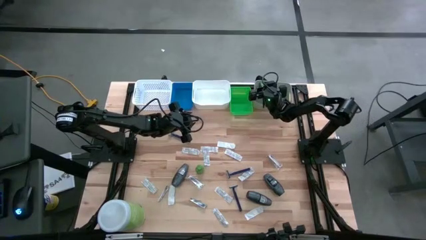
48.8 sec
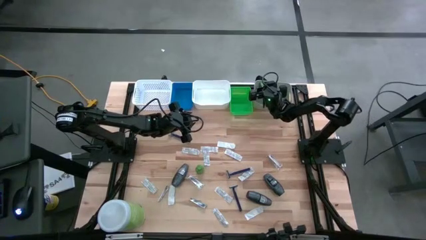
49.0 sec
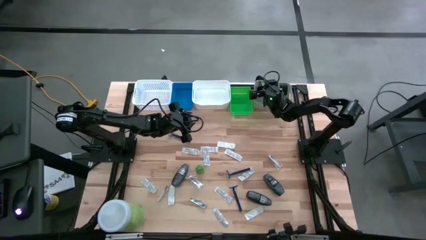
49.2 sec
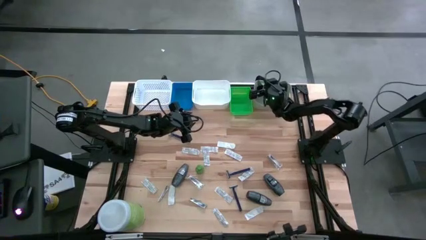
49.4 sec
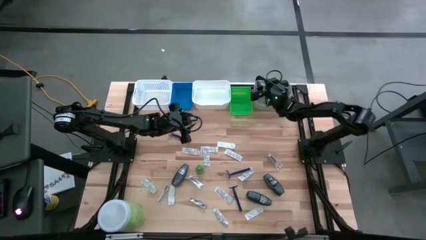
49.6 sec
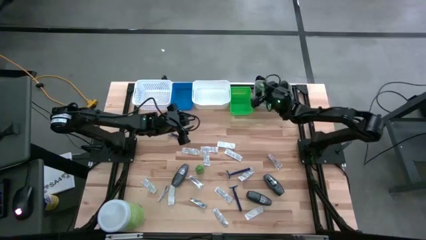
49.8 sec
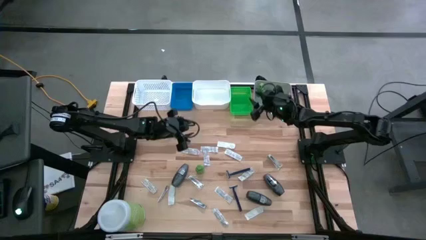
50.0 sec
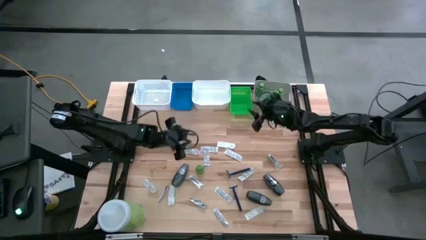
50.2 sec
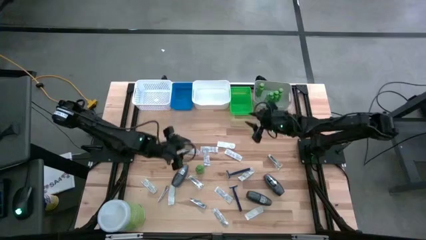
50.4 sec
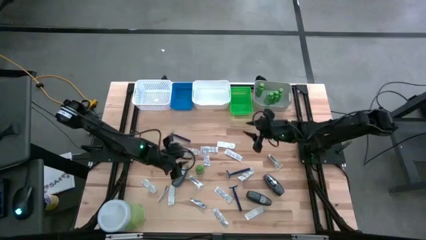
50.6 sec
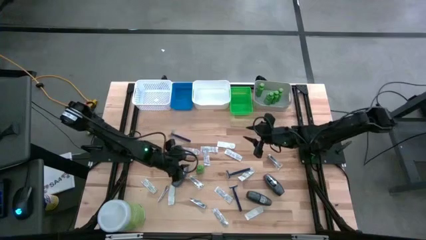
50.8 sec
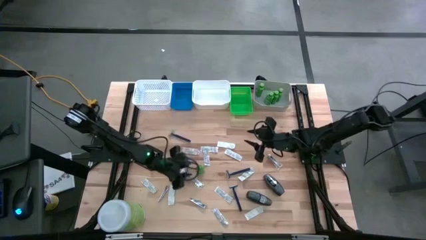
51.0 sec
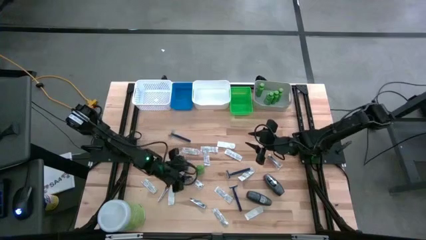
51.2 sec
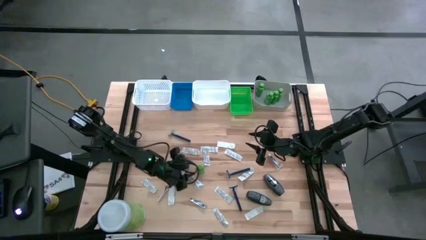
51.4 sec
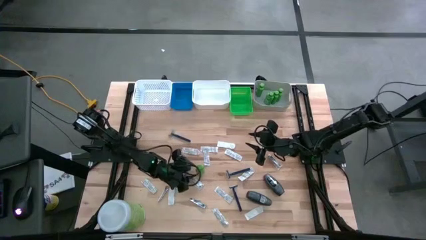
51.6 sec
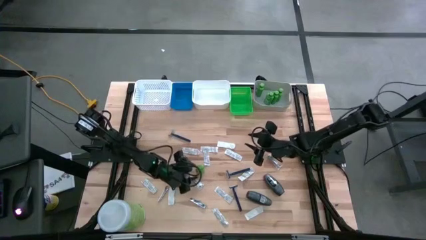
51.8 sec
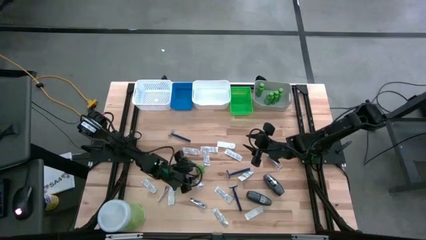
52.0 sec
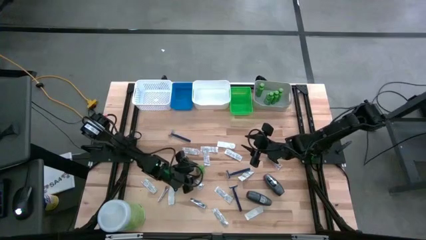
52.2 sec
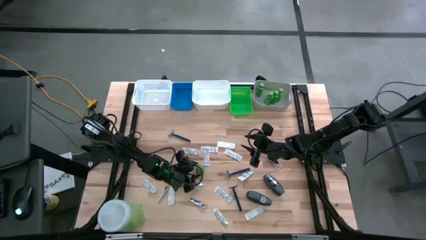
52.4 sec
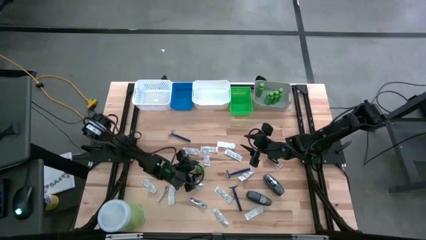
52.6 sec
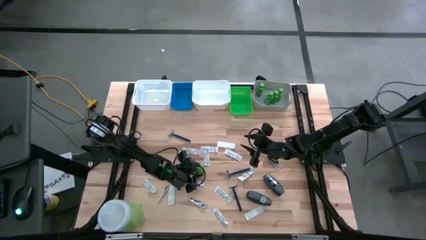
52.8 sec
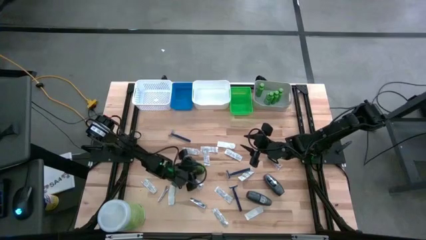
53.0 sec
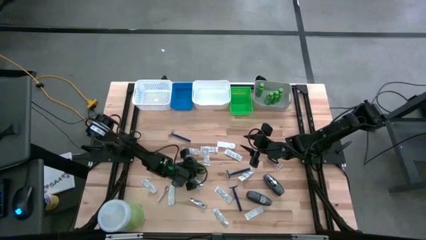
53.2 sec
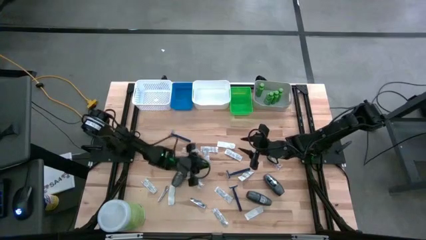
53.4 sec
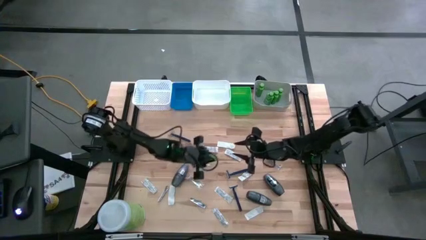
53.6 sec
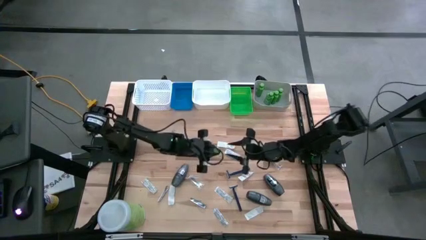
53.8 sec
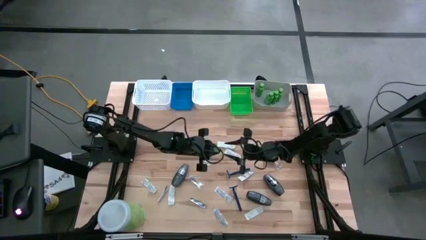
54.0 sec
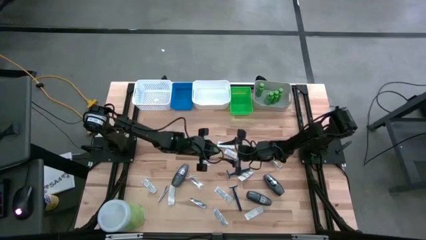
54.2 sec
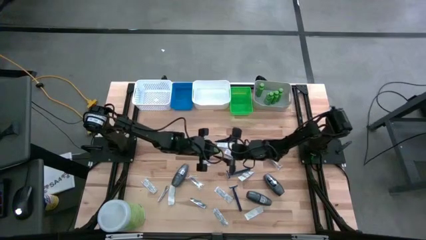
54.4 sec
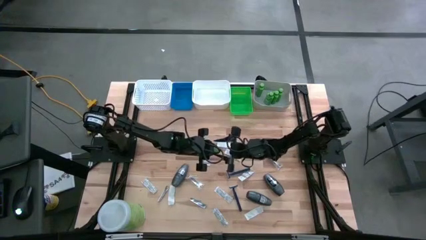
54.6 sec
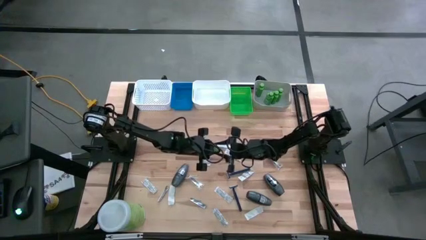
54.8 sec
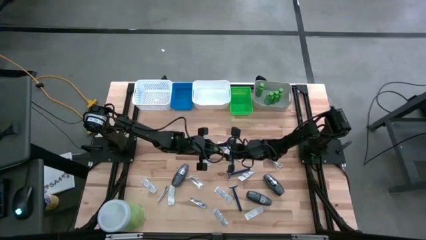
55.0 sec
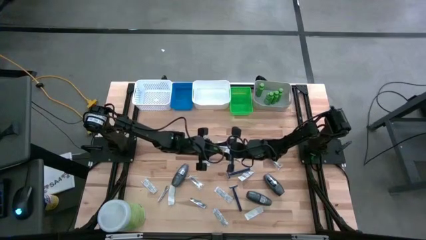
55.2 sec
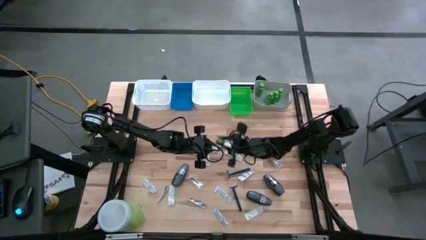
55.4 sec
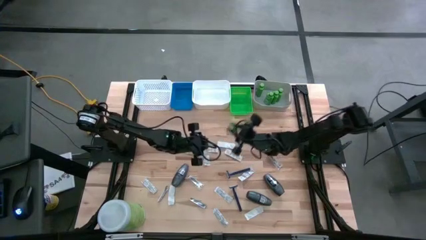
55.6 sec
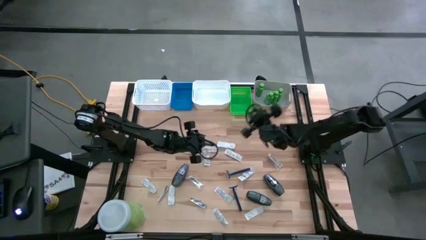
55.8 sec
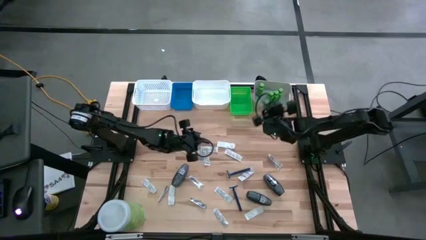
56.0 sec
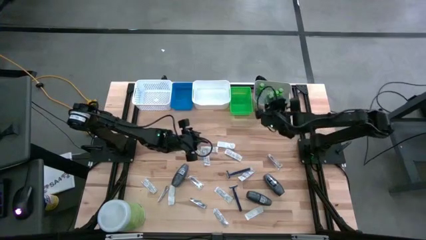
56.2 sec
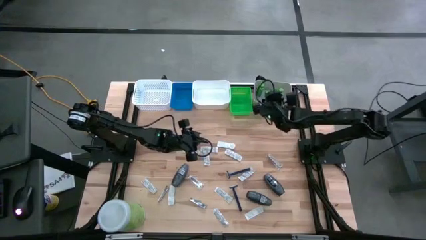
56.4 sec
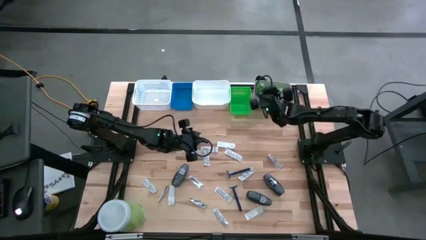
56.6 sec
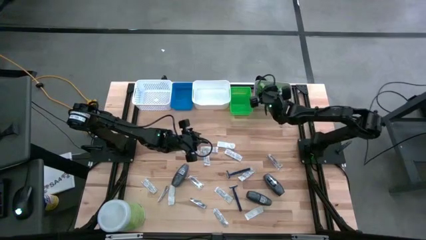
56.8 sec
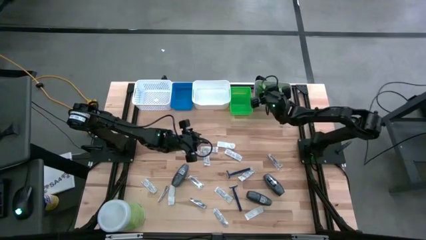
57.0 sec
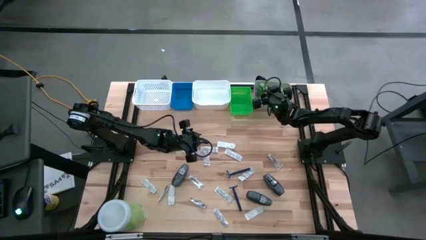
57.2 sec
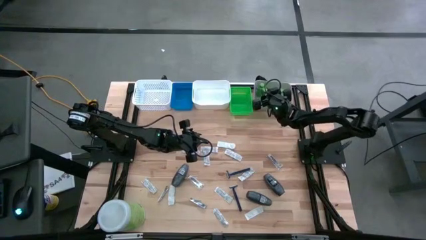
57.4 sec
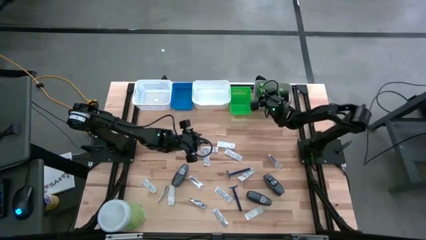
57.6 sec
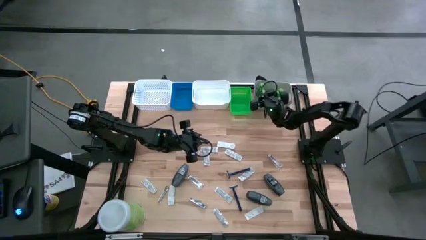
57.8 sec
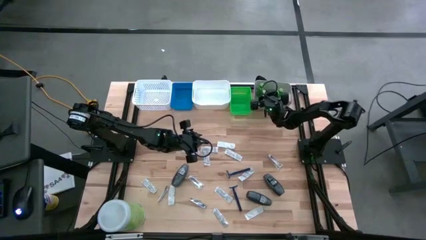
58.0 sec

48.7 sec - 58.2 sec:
Task: Pick & Place Travel size toiletries
Put the shampoo into the gray bin

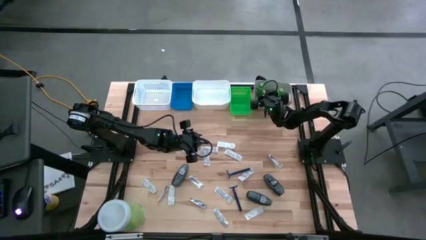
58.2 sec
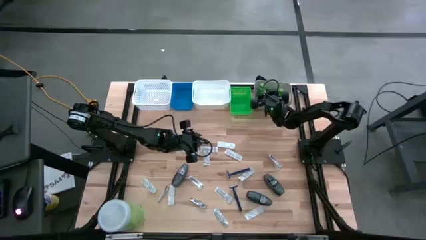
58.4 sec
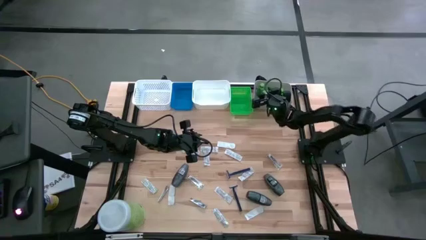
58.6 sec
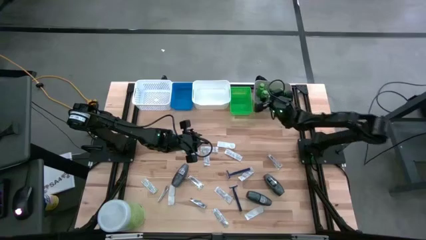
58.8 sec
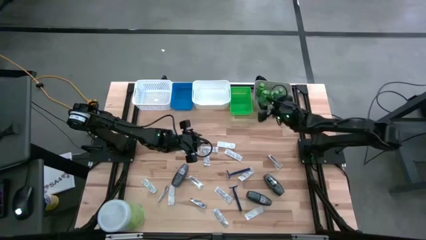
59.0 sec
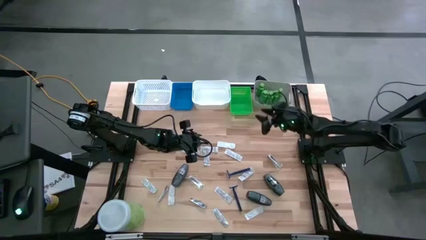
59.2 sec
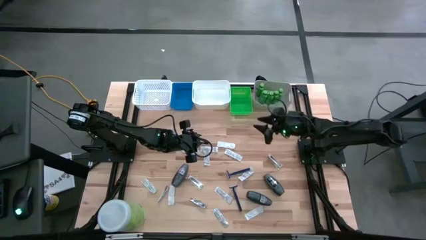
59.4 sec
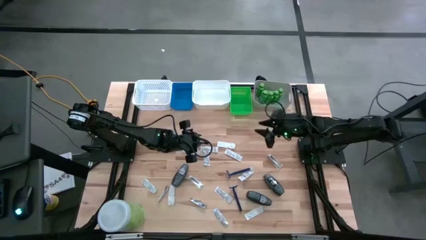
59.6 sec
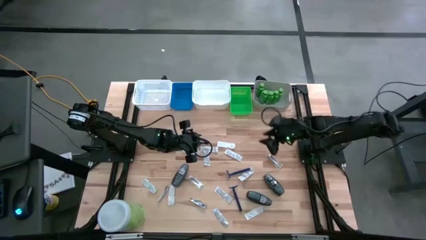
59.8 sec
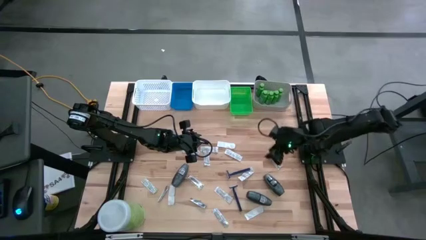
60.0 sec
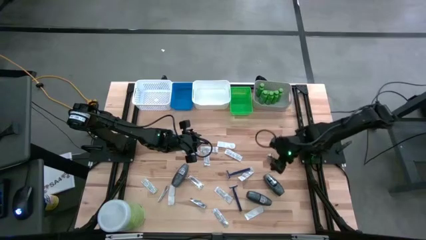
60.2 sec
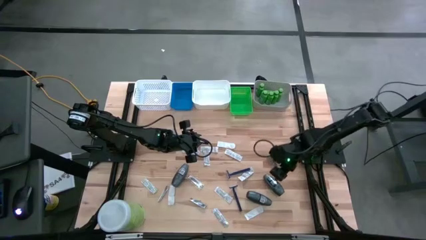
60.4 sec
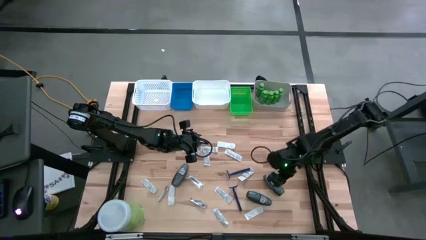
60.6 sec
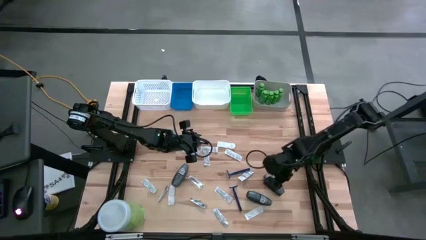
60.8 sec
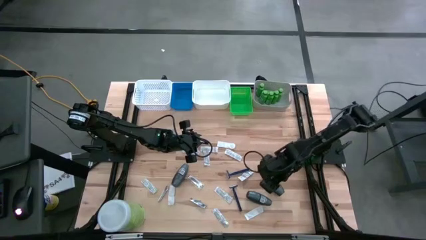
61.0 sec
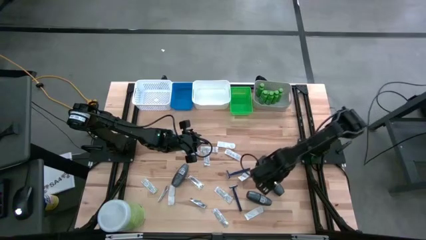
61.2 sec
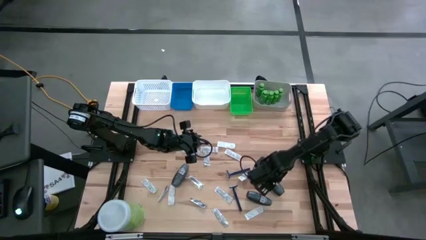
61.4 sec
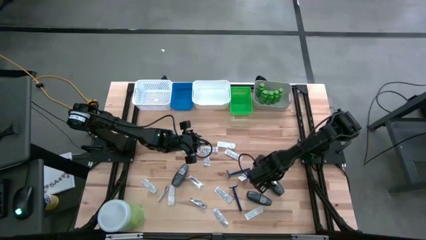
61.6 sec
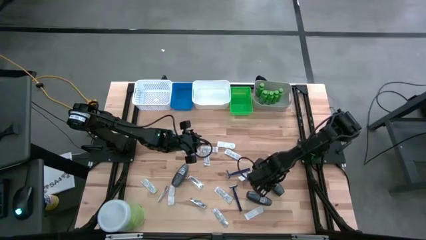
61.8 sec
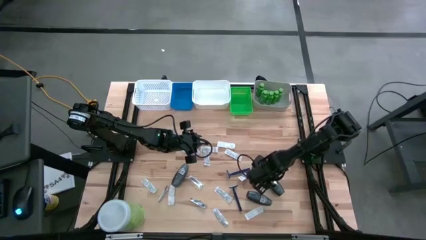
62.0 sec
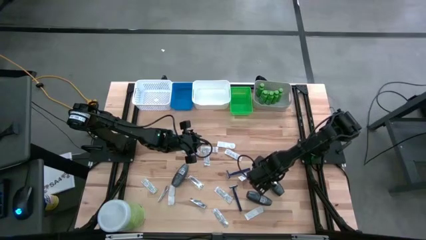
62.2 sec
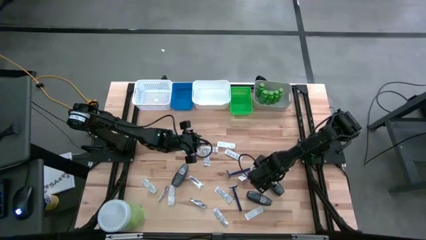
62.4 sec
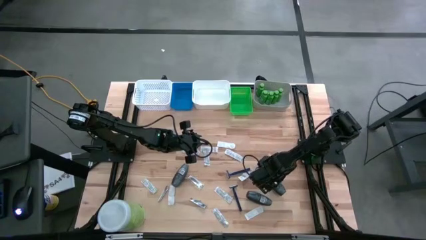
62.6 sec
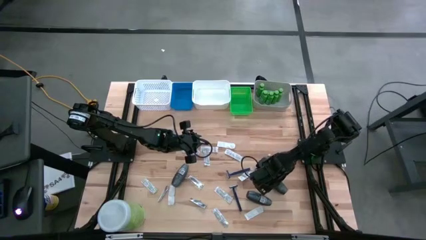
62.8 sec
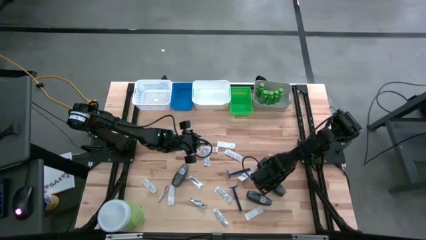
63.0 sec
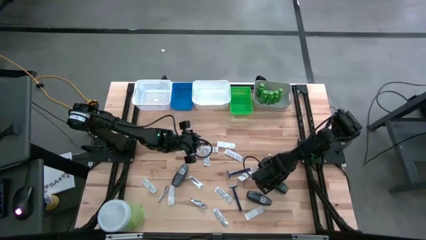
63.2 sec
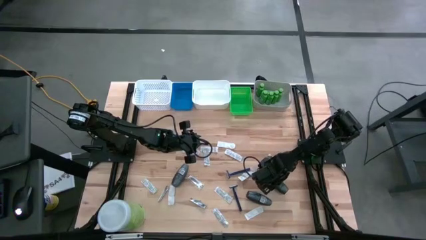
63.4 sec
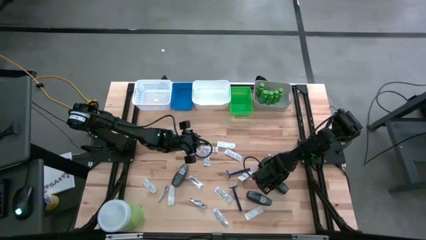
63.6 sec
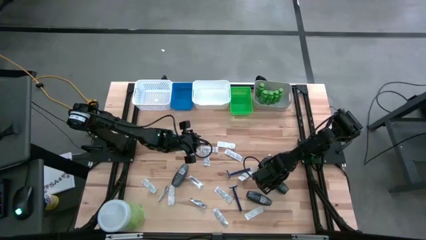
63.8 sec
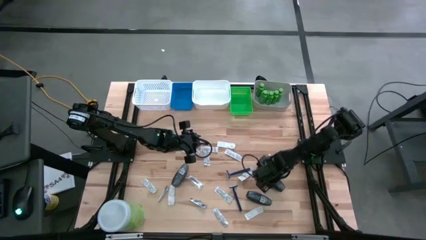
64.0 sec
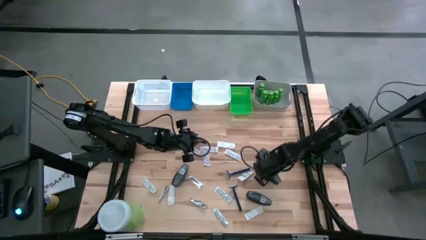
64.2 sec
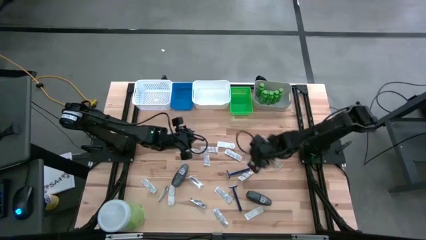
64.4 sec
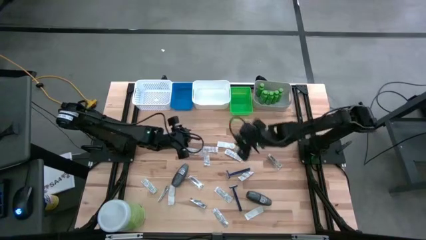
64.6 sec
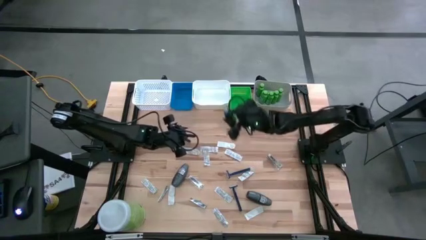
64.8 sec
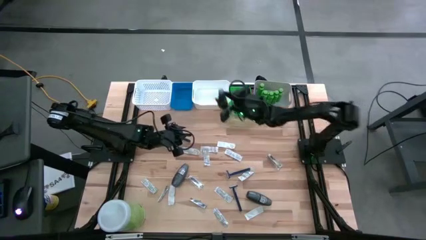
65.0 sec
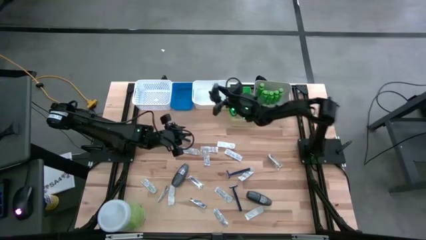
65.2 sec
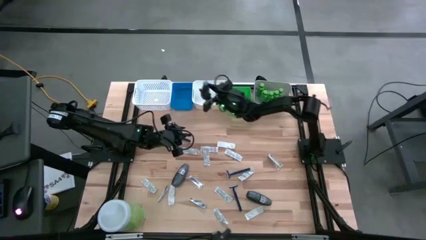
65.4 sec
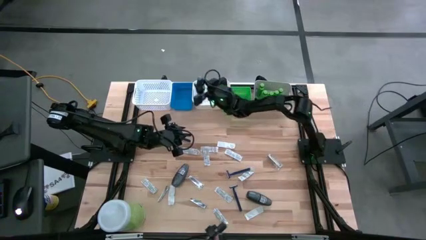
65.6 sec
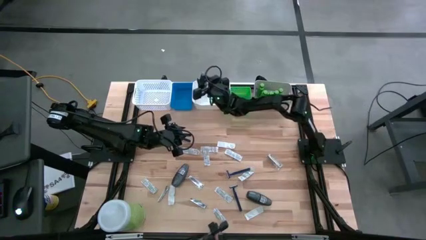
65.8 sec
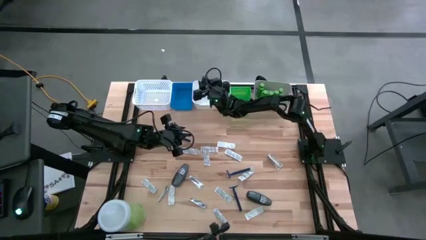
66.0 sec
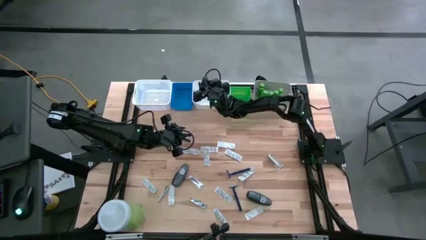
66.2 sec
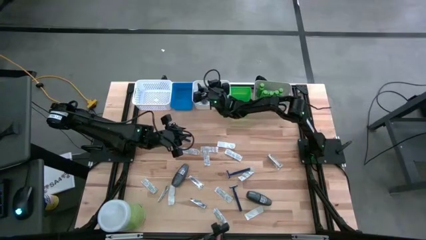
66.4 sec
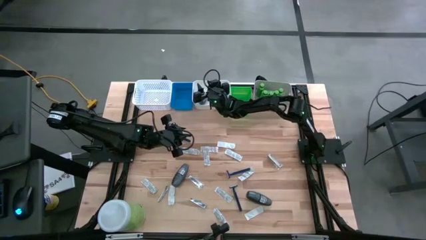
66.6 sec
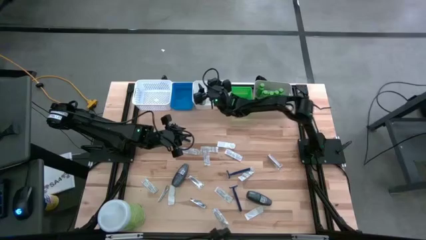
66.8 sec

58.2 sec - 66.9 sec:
Put the deodorant into the right white bin
